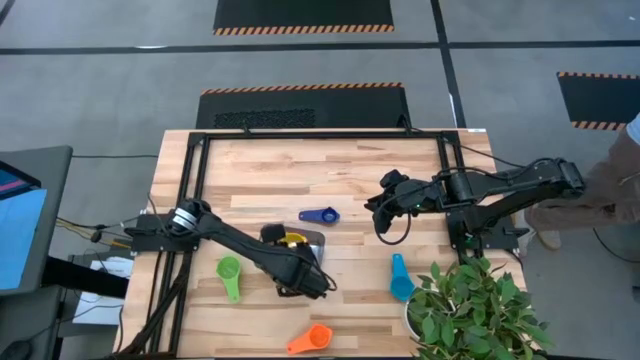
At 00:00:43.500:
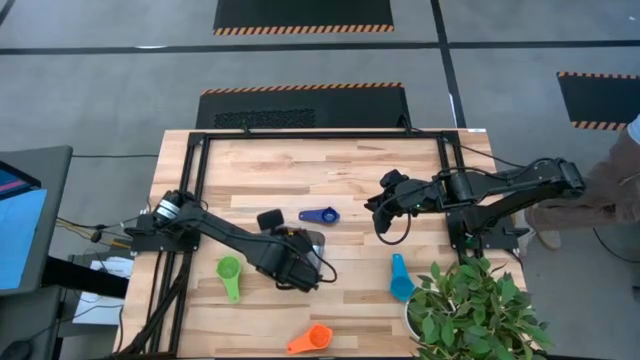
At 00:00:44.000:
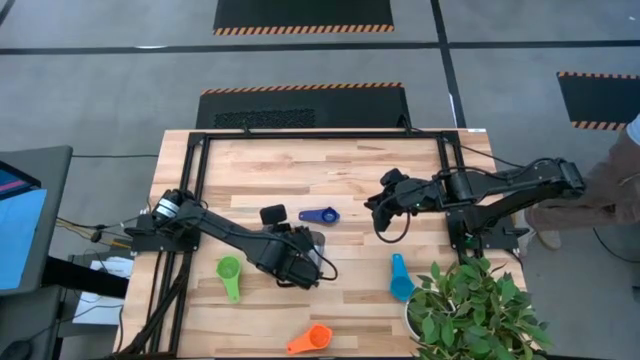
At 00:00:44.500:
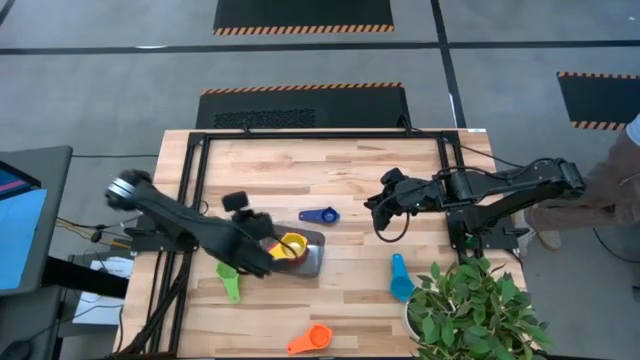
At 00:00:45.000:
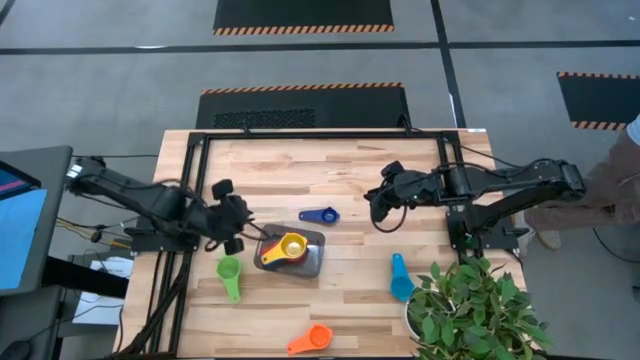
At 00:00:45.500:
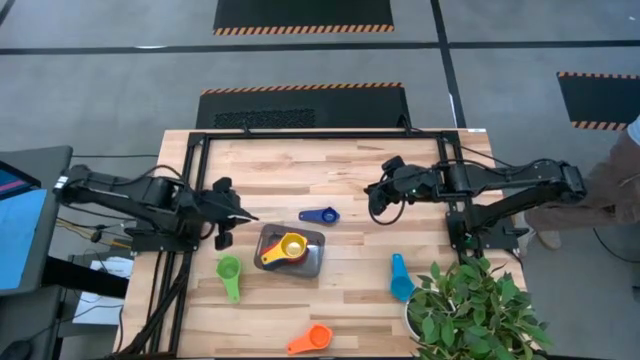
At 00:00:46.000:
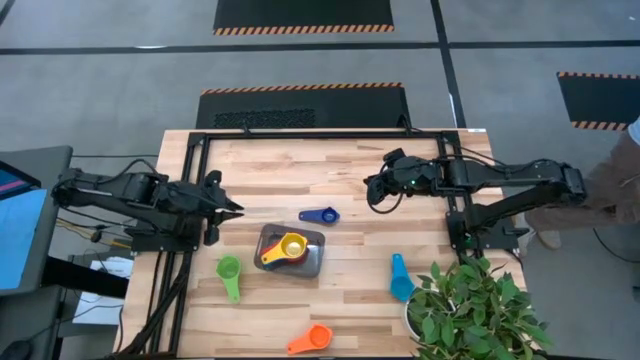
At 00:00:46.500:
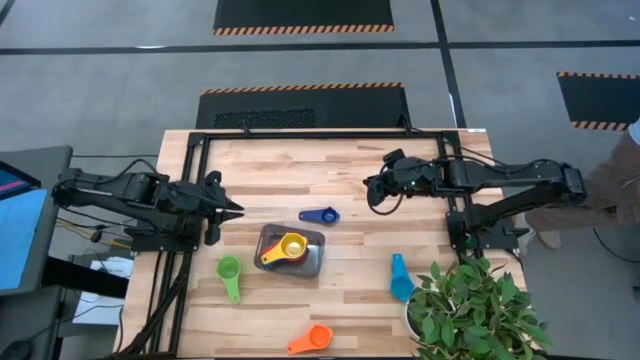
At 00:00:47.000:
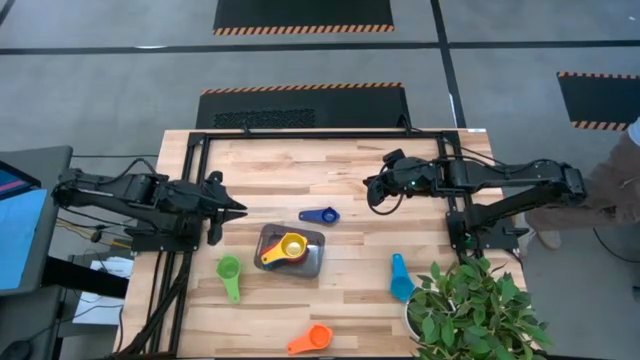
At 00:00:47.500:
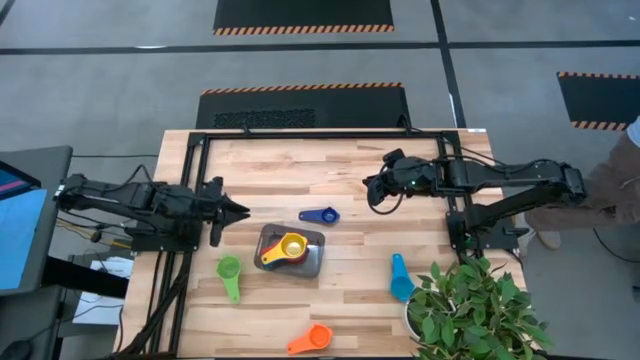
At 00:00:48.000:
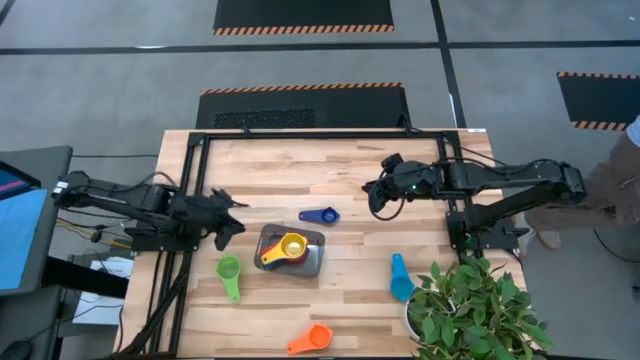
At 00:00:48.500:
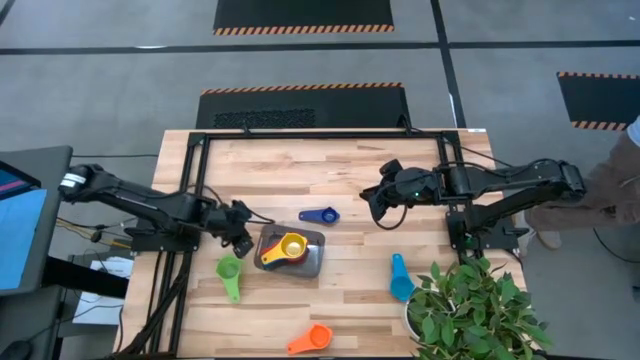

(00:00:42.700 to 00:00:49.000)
Task: Nest measuring cups in basket
Move the bin to the center of the table

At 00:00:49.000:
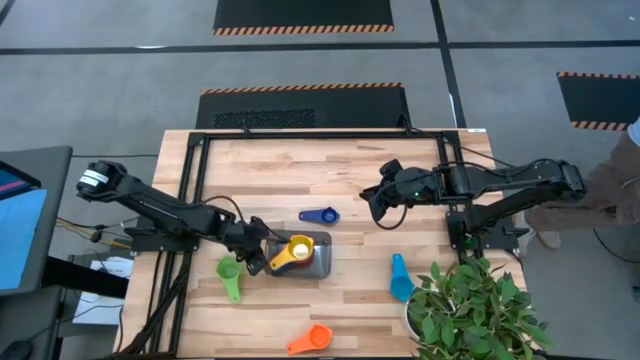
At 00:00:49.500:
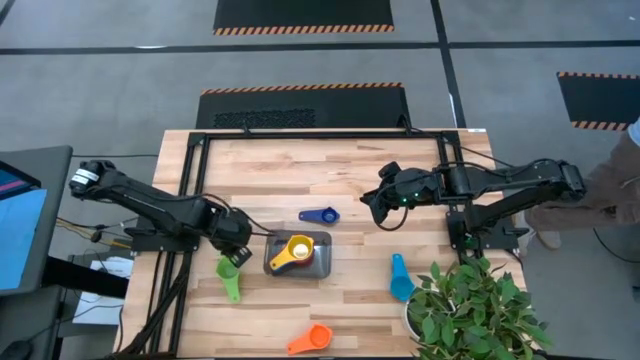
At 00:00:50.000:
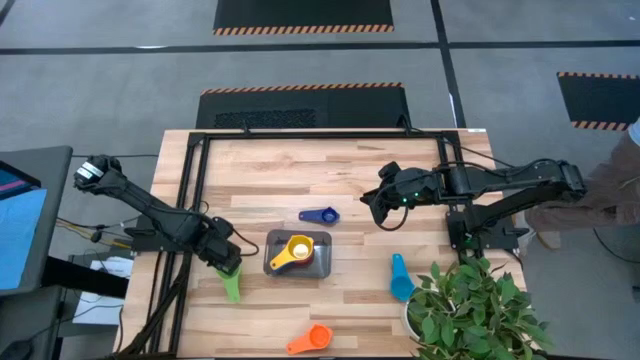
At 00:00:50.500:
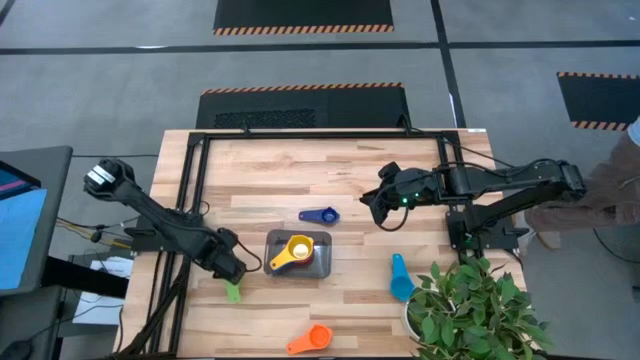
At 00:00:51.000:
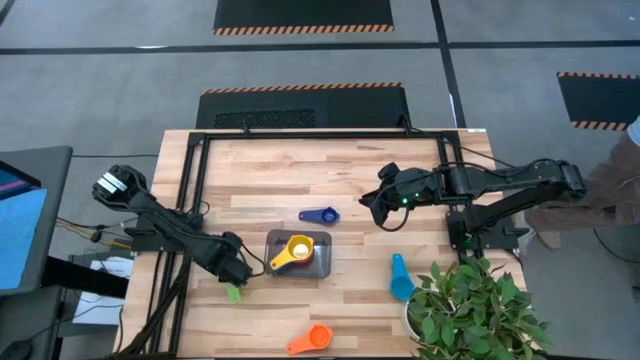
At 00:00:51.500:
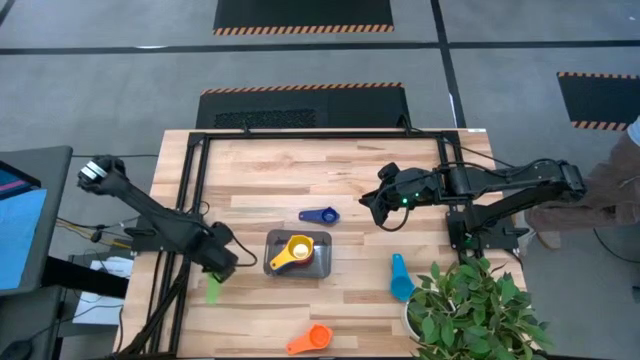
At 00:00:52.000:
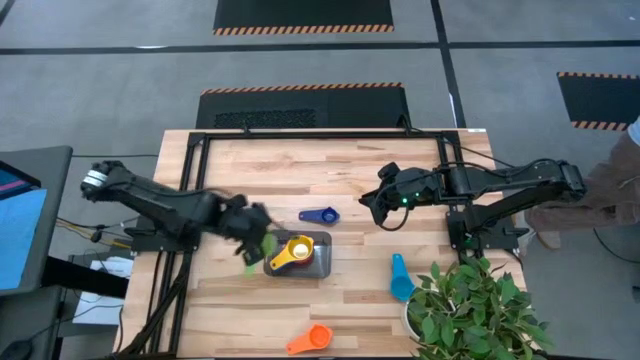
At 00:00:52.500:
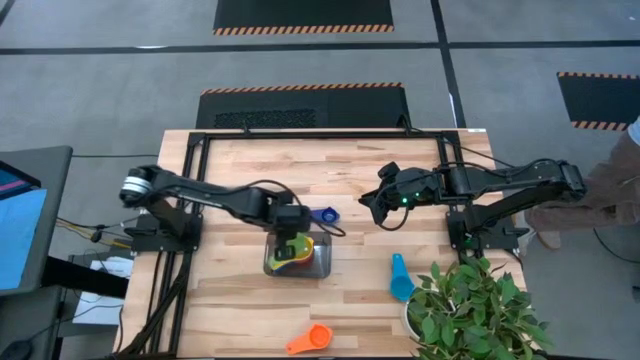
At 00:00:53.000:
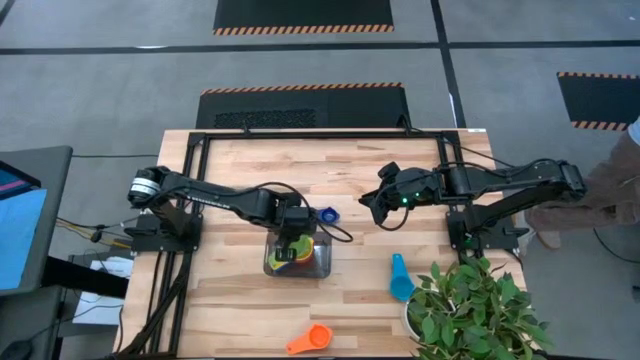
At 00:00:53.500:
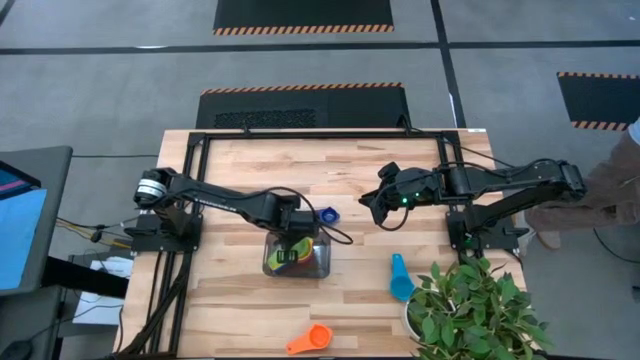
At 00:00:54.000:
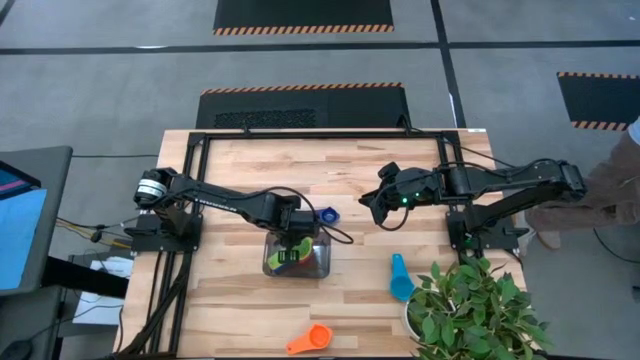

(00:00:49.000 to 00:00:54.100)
Stack the green measuring cup on top of yellow measuring cup into the bin

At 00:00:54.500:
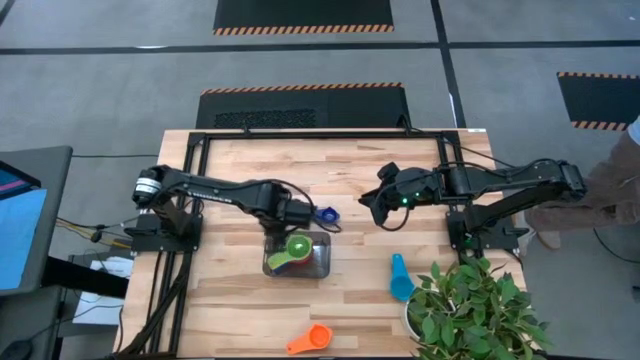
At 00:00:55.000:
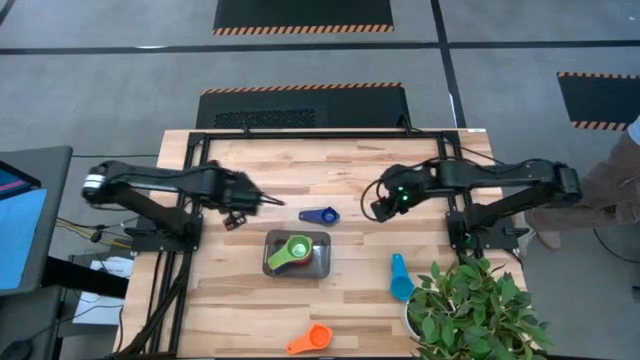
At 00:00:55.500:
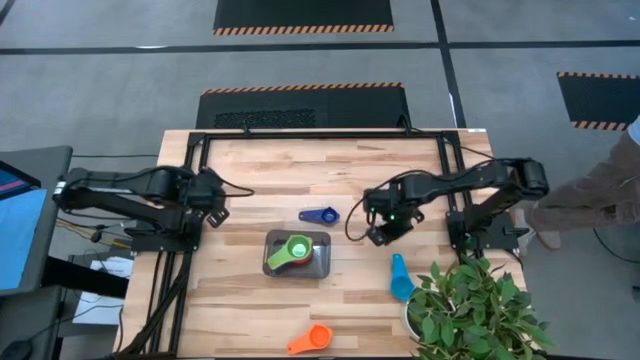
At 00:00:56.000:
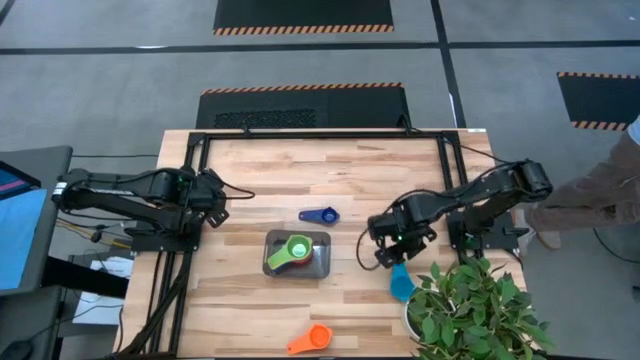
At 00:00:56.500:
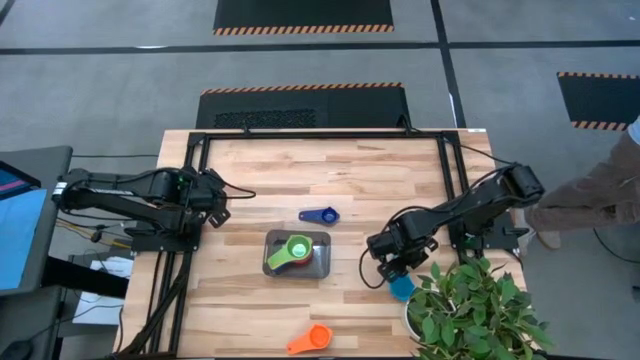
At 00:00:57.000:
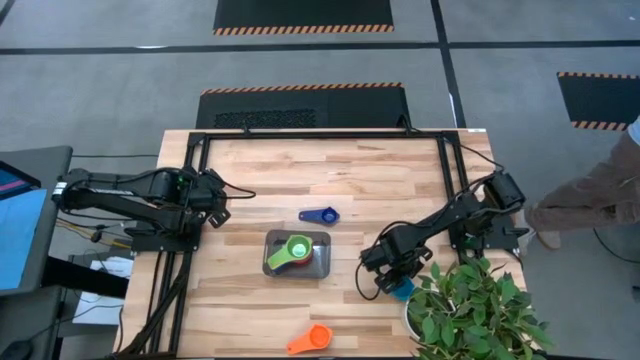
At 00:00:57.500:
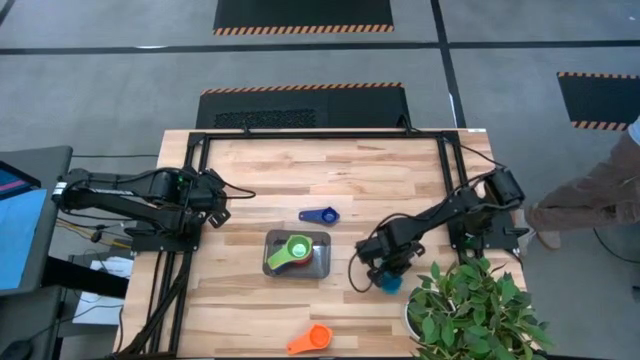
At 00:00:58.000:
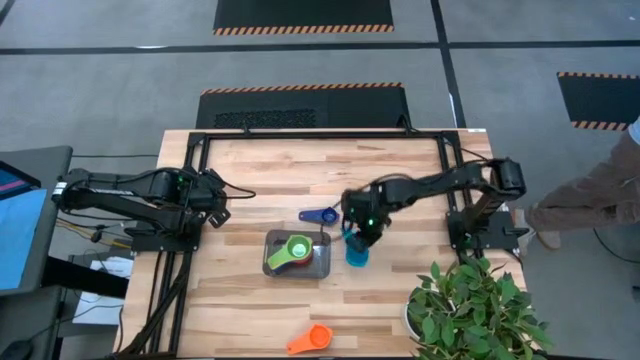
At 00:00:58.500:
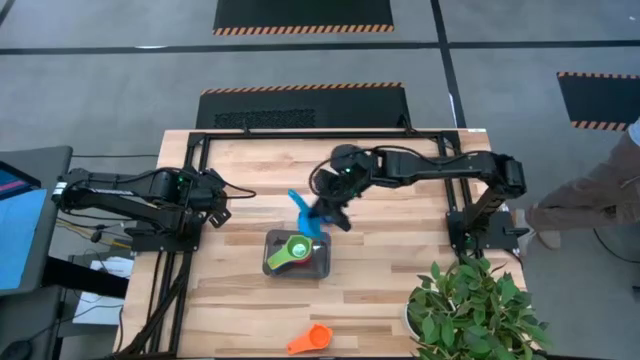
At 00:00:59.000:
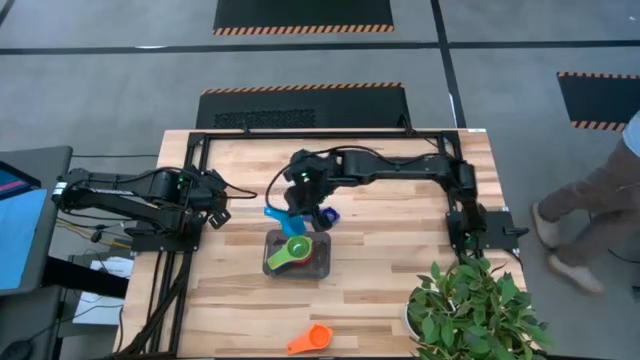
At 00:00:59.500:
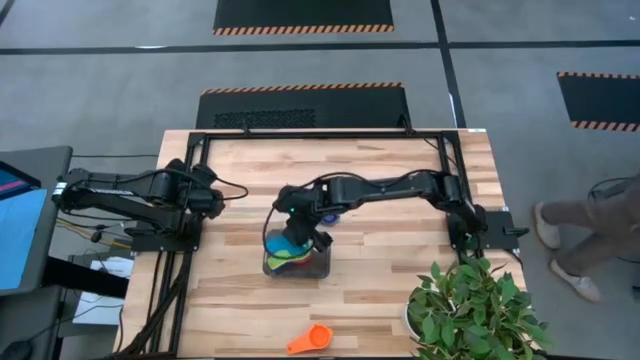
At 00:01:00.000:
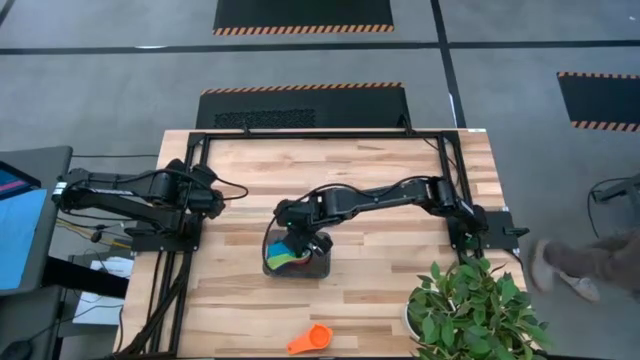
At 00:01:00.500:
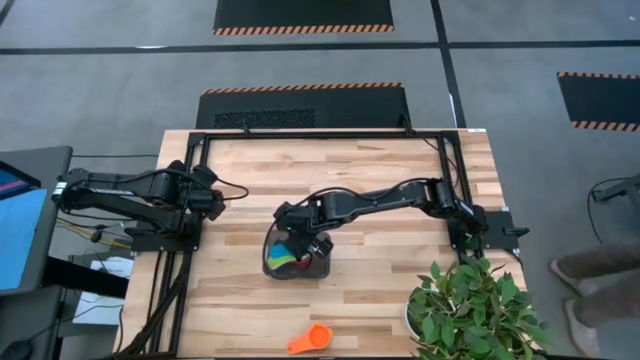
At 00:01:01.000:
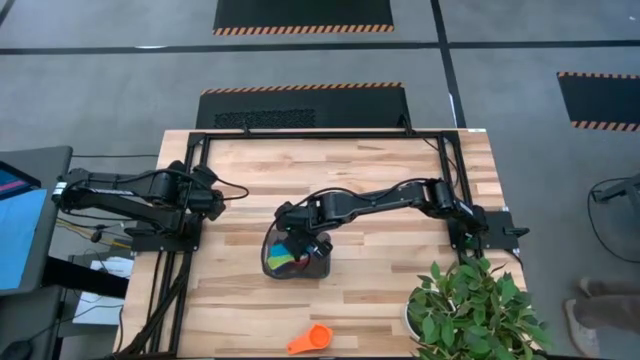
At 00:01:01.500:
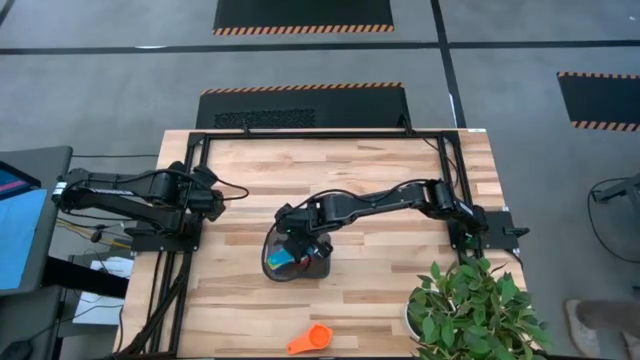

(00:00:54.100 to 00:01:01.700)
Stack the light blue measuring cup on top of the green measuring cup into the bin
